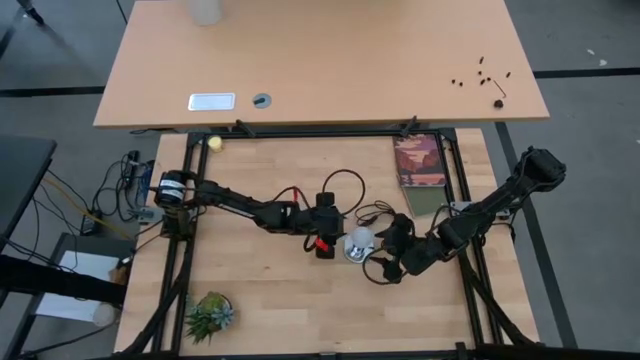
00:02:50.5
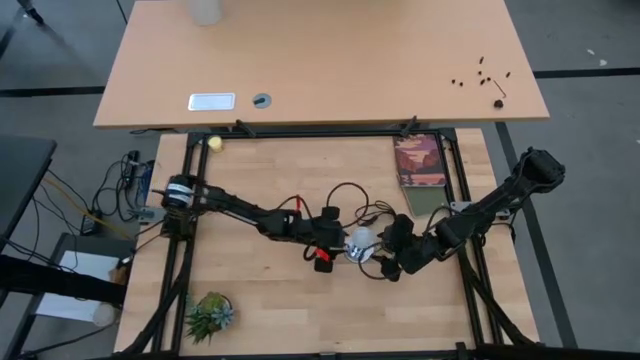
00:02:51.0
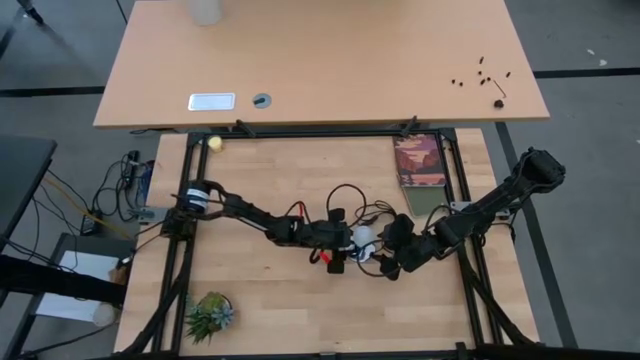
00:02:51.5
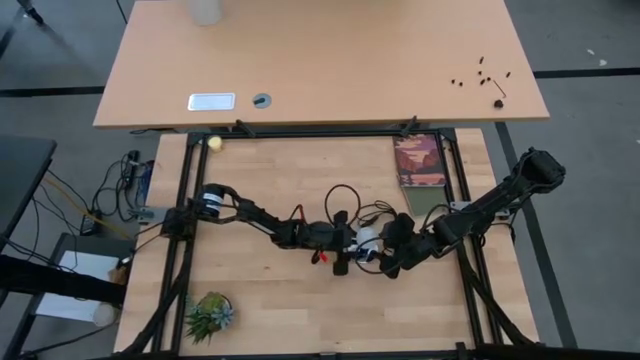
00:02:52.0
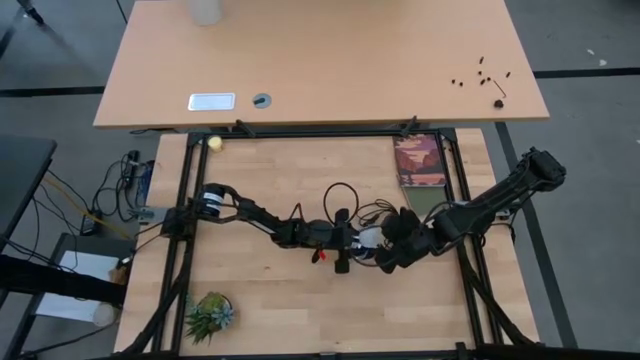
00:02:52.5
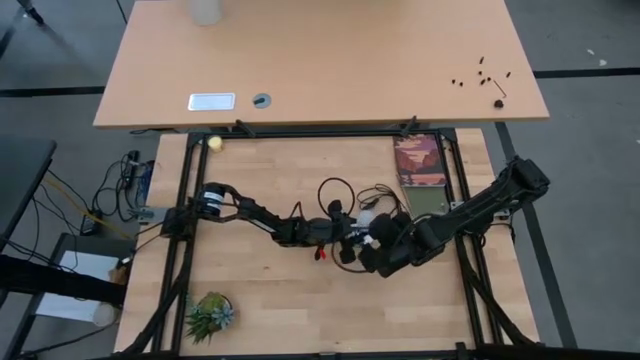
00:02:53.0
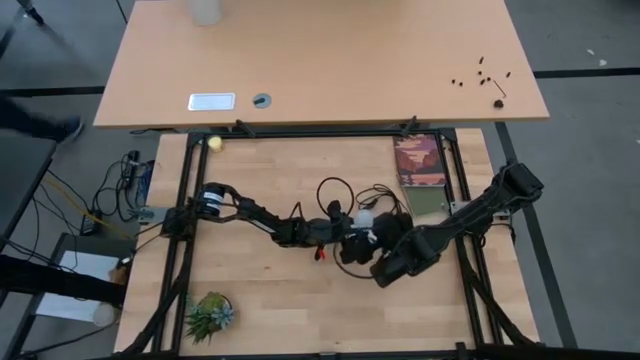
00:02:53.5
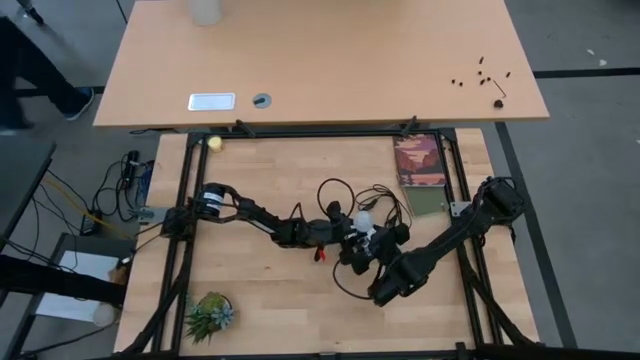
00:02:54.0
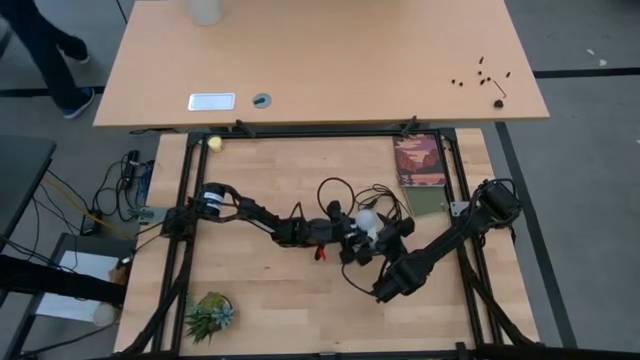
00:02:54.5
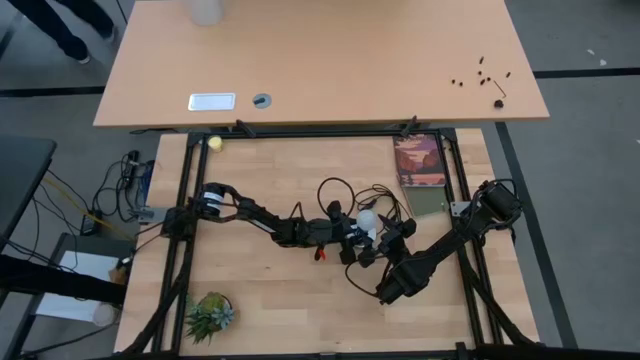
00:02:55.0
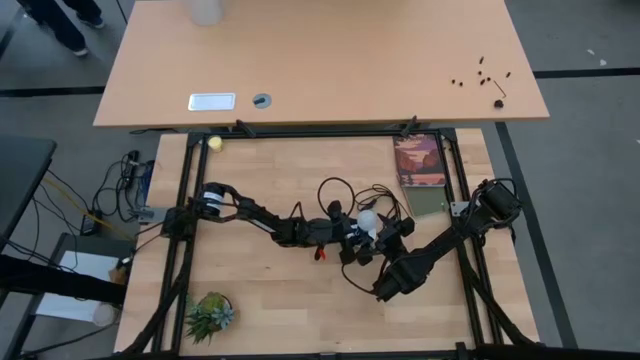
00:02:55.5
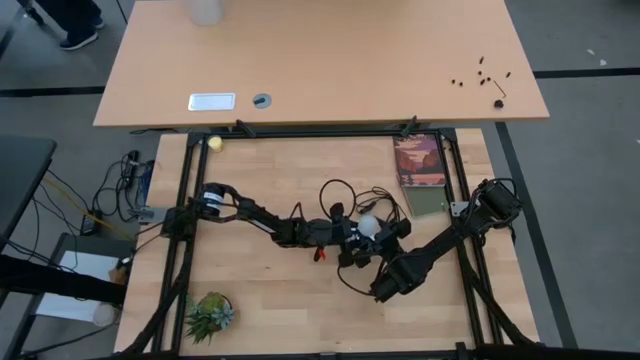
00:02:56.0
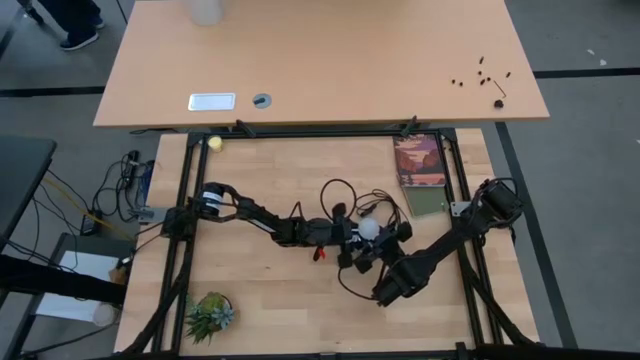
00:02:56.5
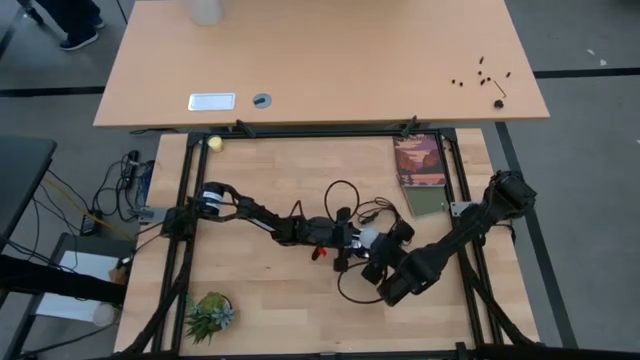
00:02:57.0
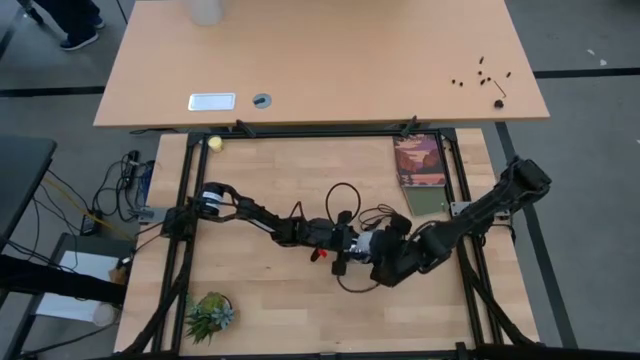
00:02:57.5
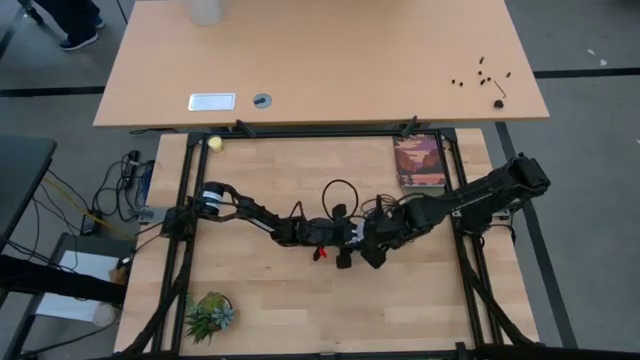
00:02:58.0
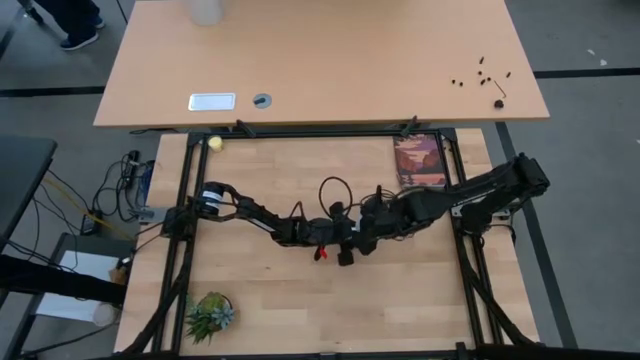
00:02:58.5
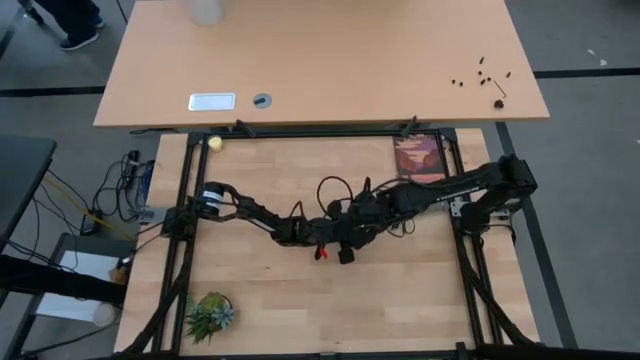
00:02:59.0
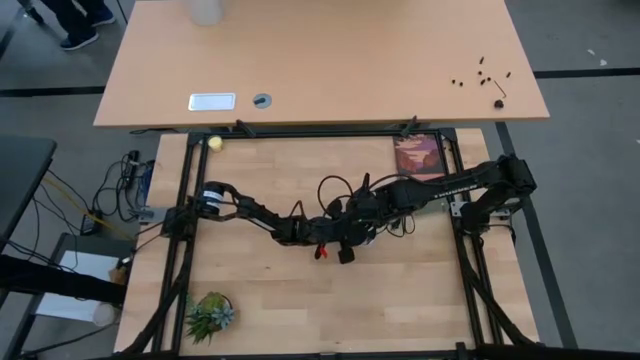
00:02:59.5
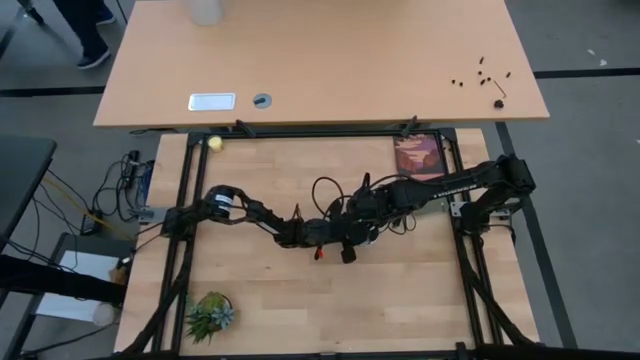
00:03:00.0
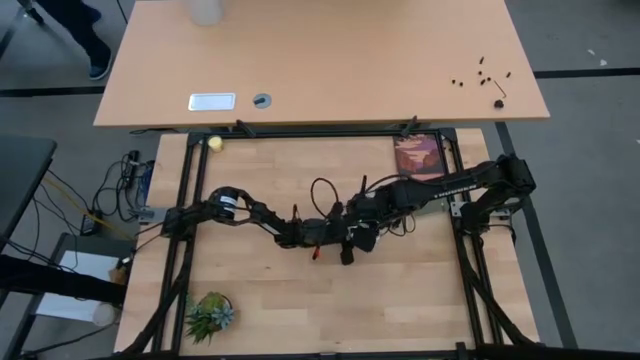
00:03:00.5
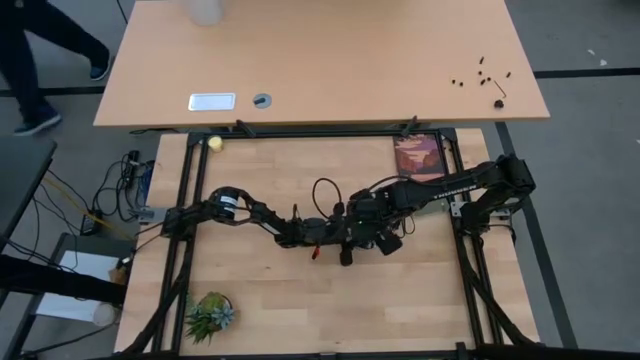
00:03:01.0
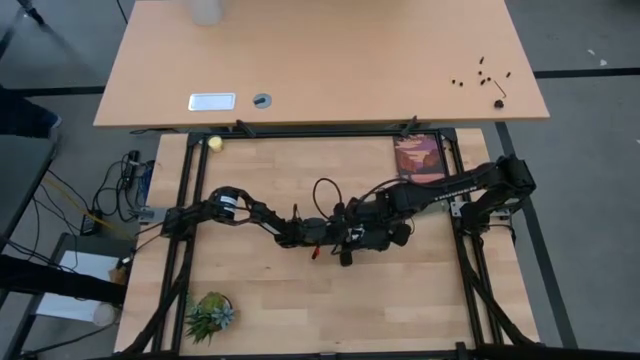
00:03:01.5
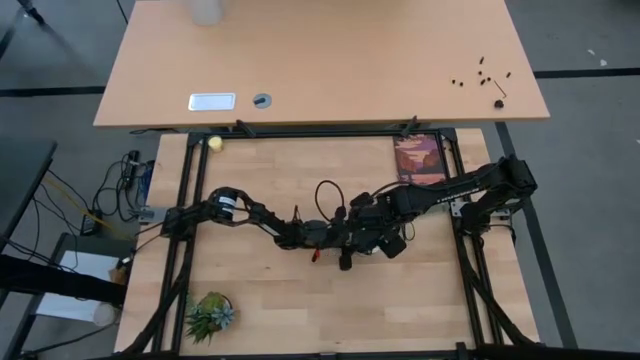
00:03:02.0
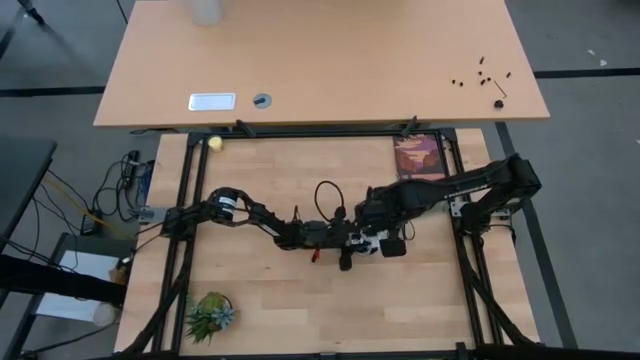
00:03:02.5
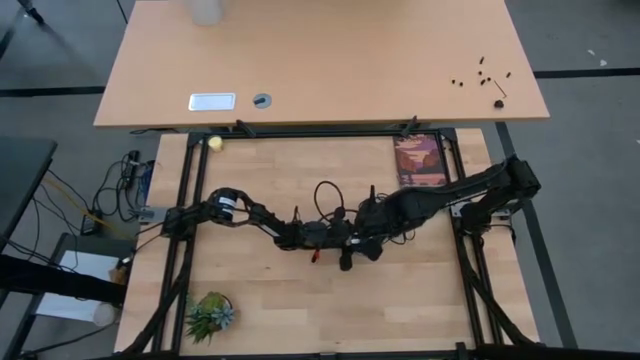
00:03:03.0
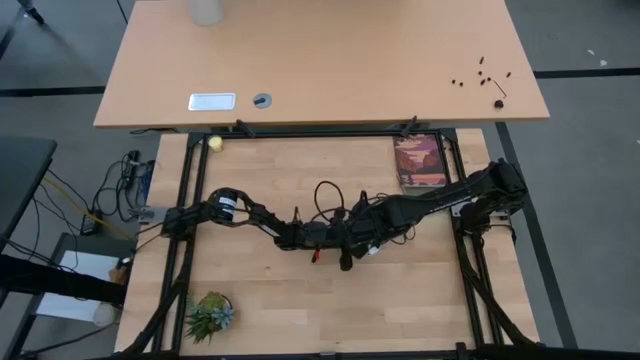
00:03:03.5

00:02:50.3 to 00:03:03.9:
Task: Screw lightbulb
Remove the lightbulb from the silver lamp

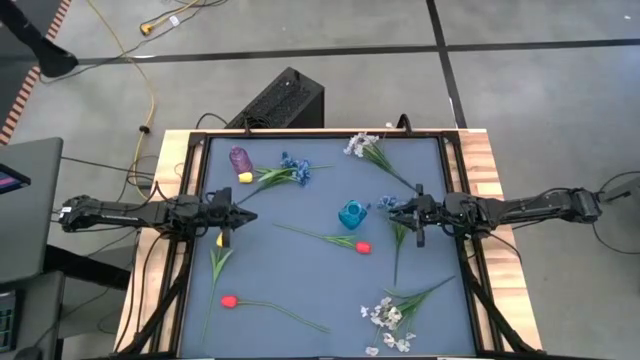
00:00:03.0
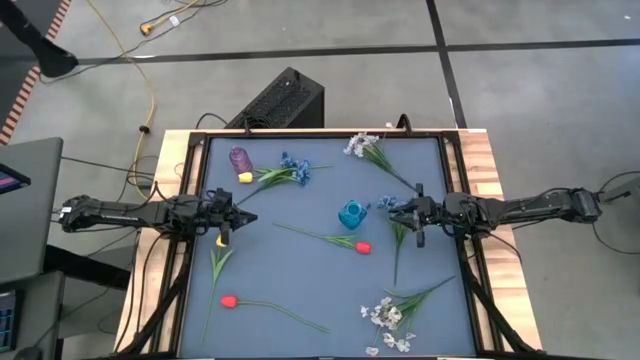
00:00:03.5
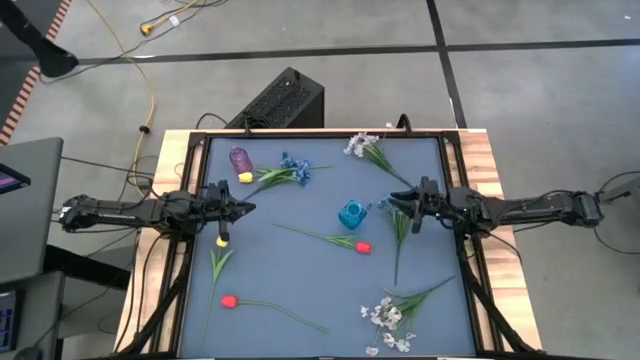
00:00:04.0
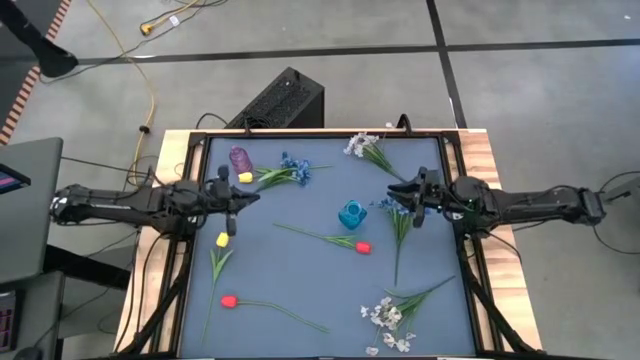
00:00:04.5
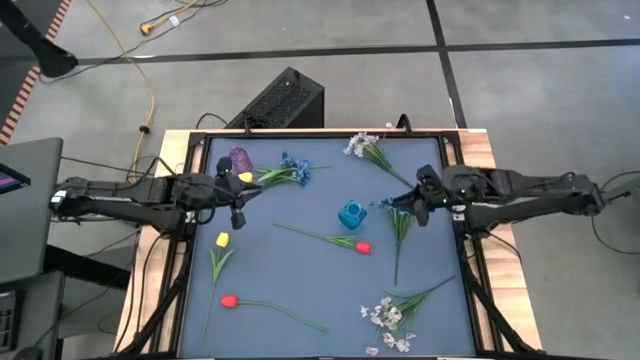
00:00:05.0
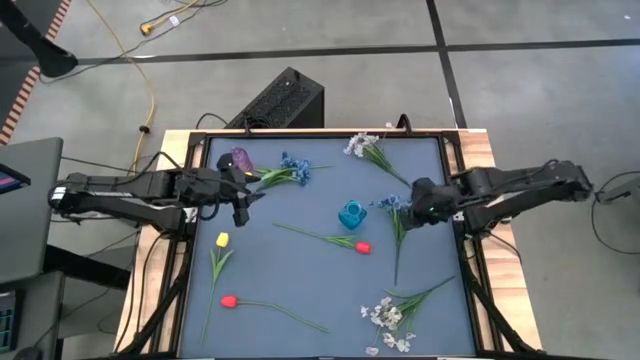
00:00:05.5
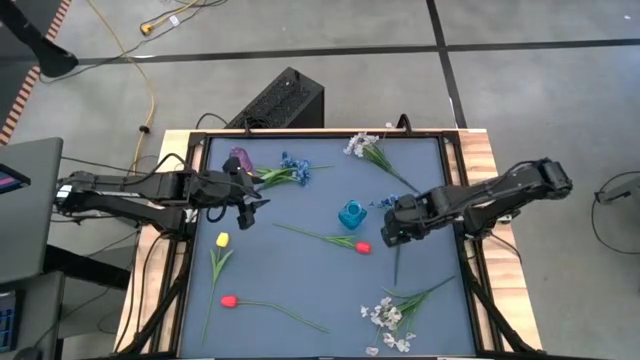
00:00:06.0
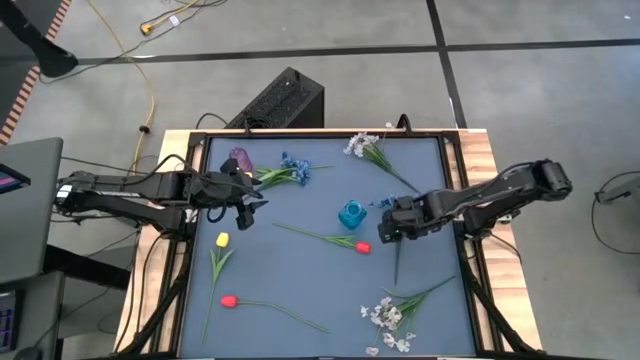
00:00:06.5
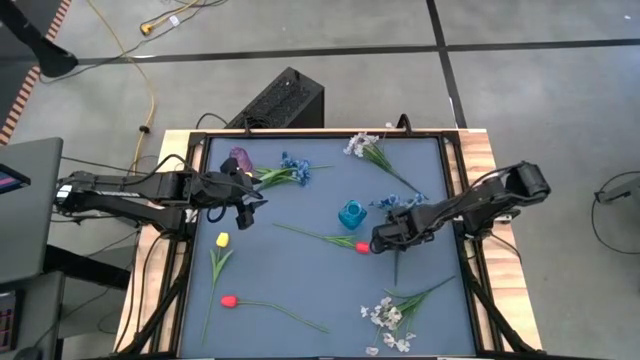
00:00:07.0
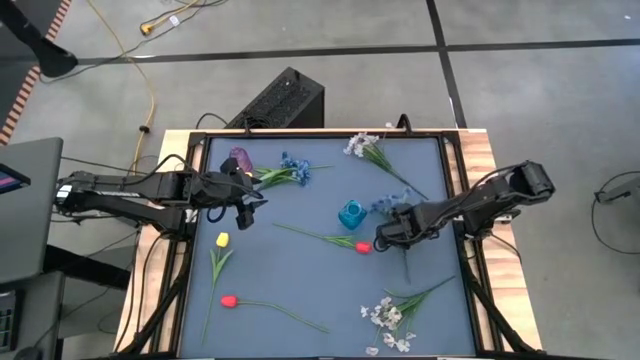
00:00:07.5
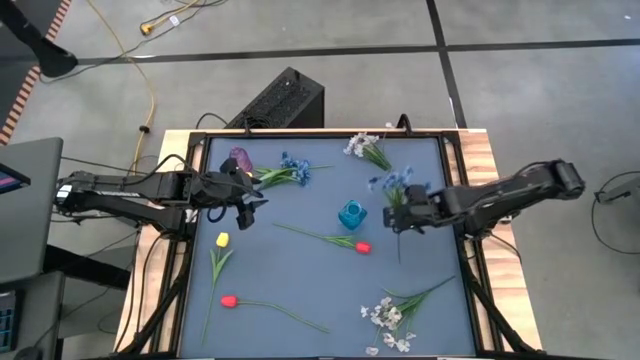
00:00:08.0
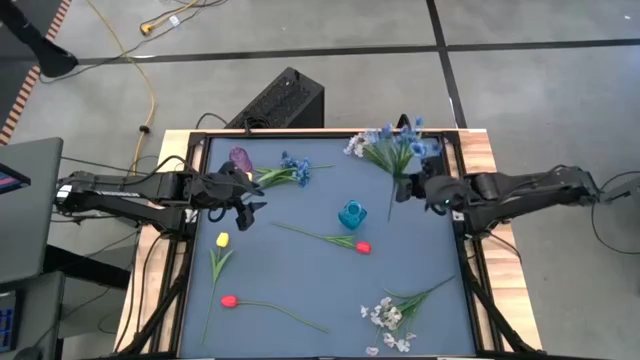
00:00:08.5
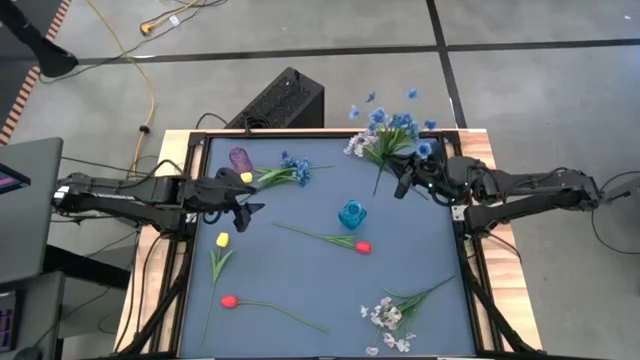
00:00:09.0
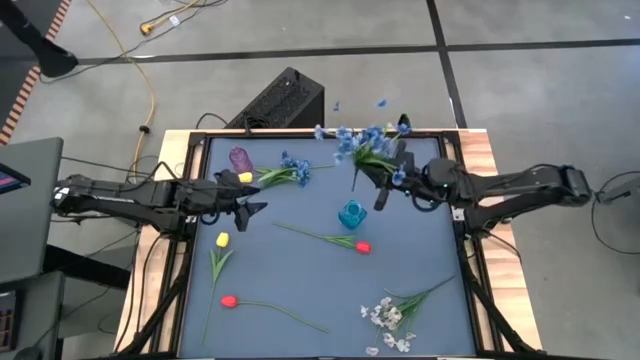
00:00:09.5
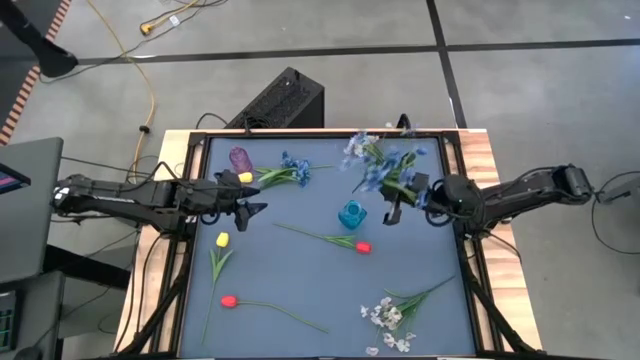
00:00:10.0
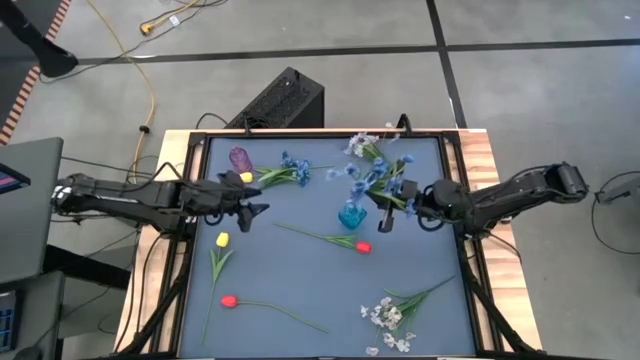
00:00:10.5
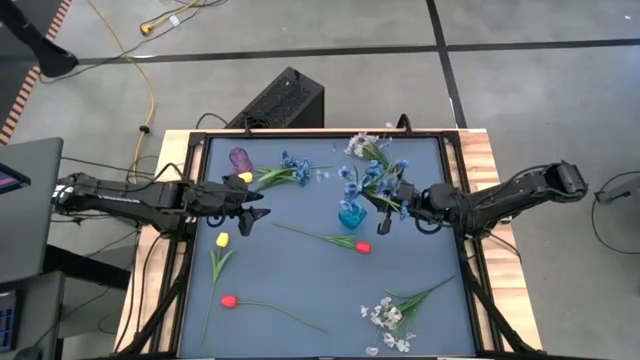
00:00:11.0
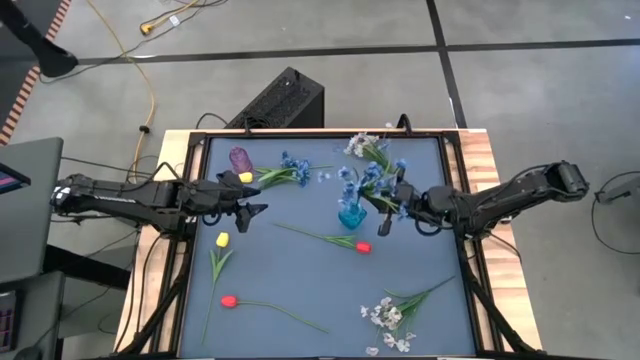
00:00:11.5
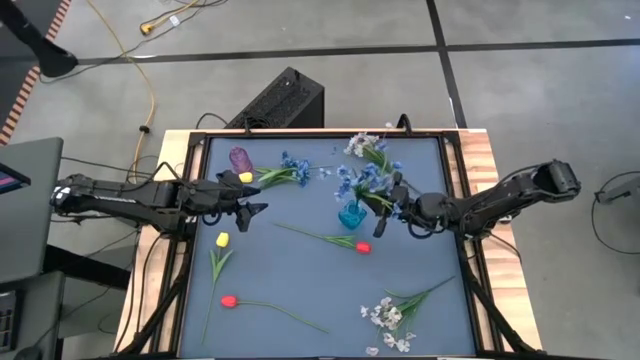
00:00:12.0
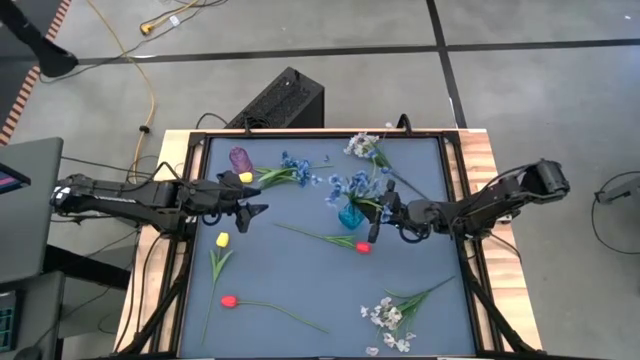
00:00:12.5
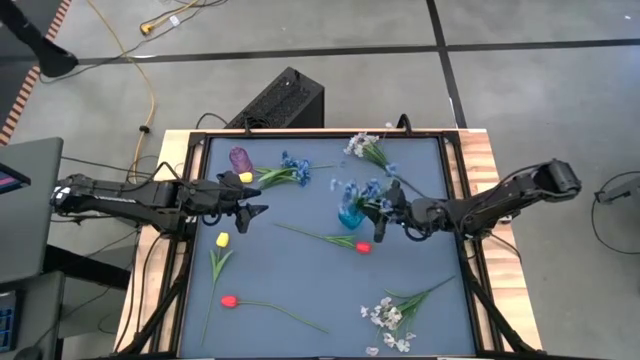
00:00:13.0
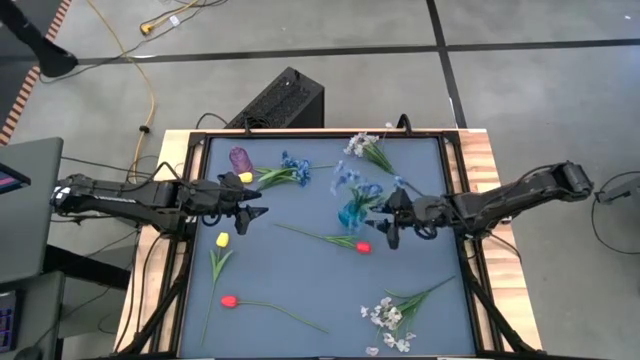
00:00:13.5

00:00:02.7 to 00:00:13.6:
Task: Sort flowers into vase by color
Put the right blue flowers into the blue vase
